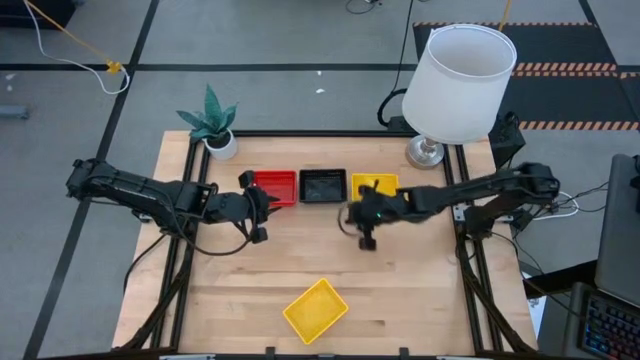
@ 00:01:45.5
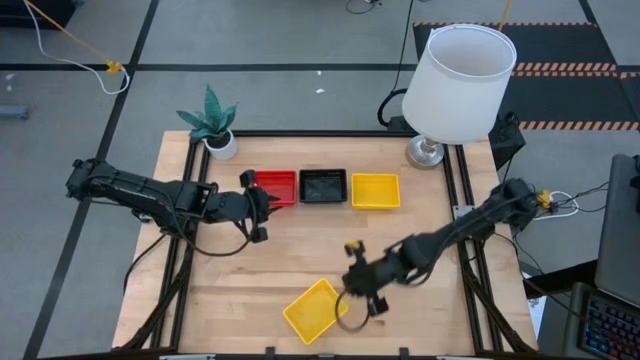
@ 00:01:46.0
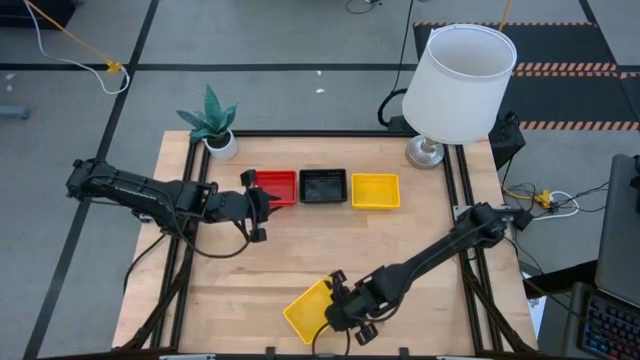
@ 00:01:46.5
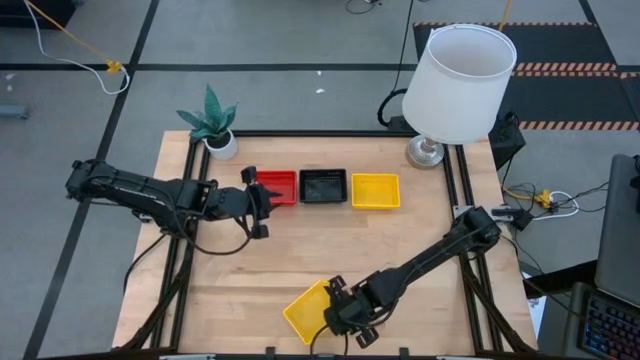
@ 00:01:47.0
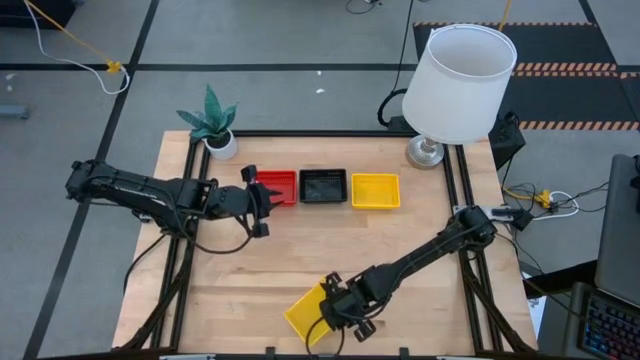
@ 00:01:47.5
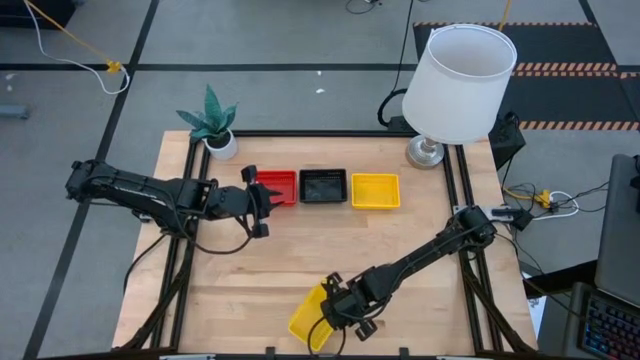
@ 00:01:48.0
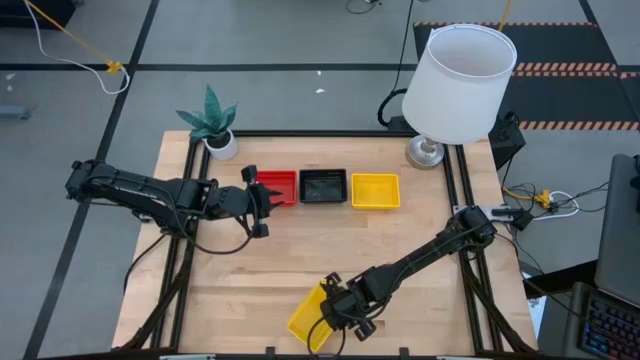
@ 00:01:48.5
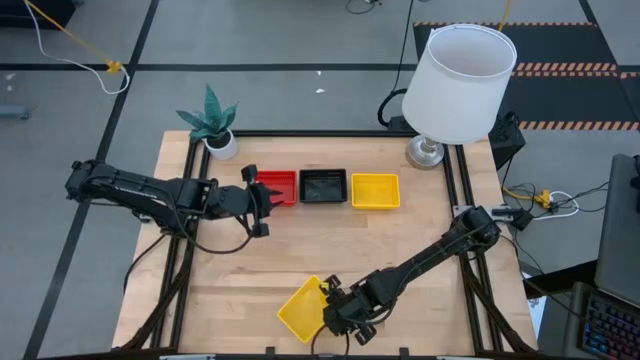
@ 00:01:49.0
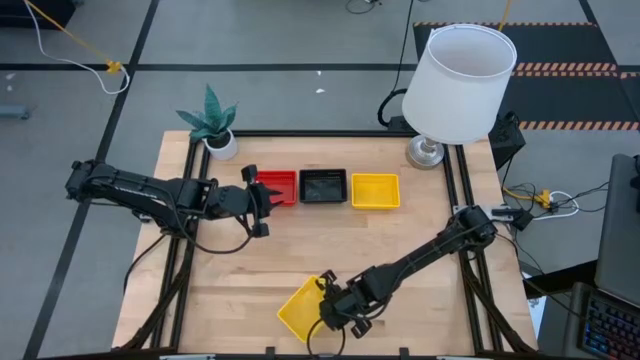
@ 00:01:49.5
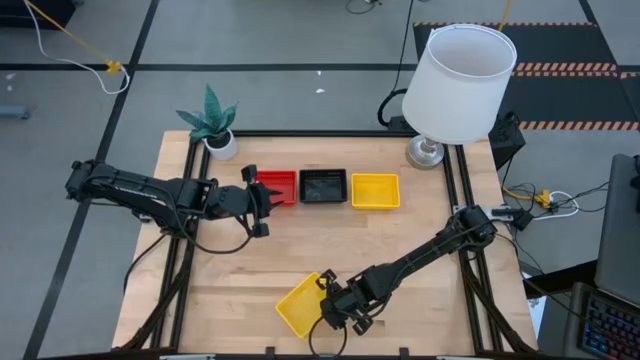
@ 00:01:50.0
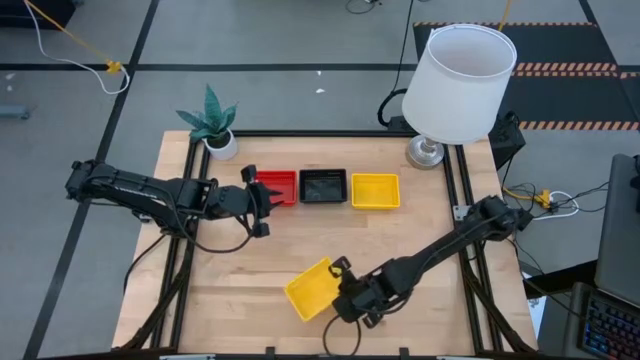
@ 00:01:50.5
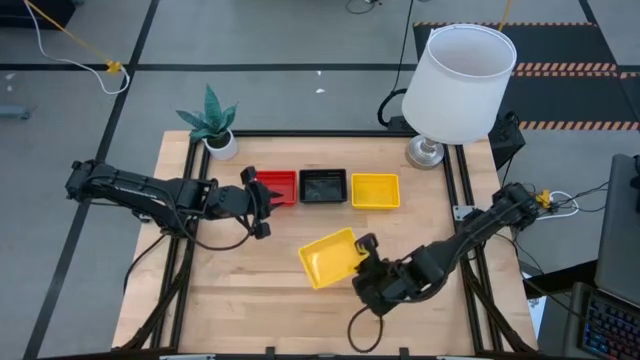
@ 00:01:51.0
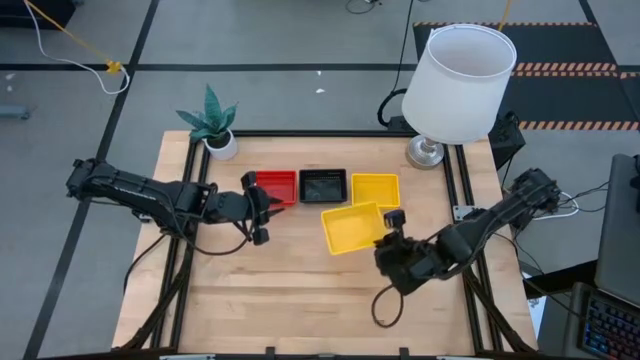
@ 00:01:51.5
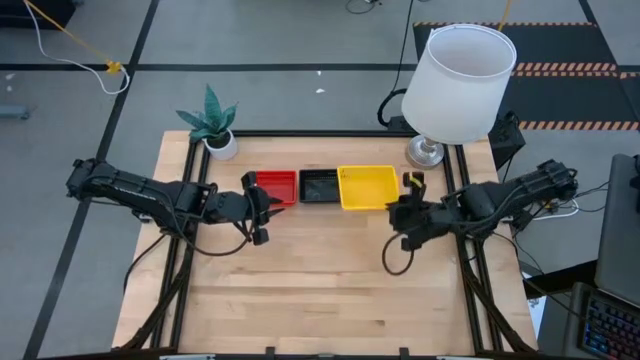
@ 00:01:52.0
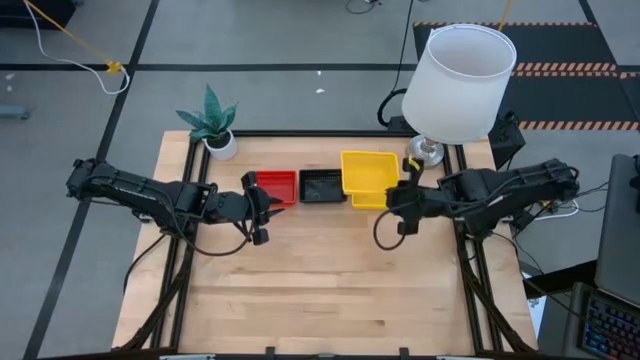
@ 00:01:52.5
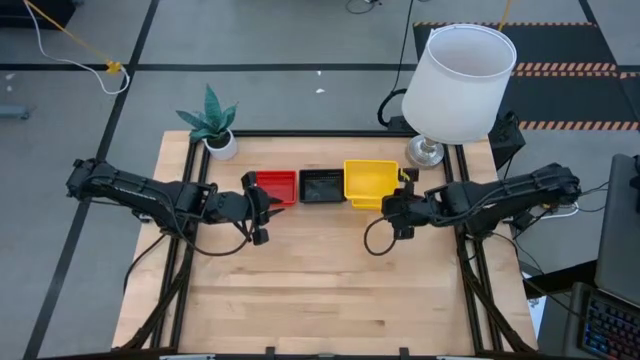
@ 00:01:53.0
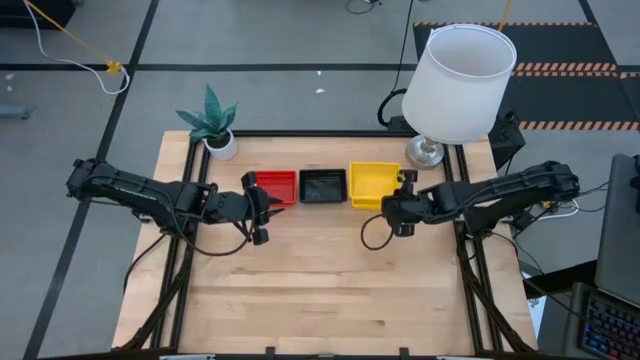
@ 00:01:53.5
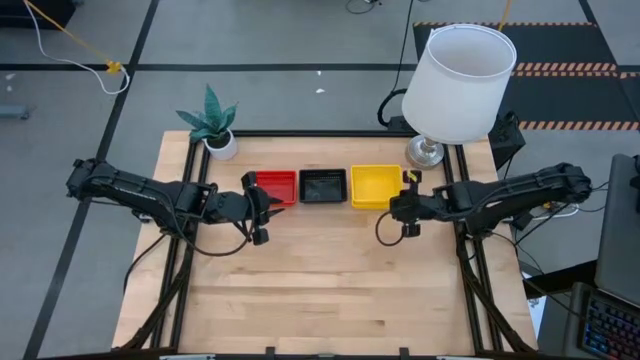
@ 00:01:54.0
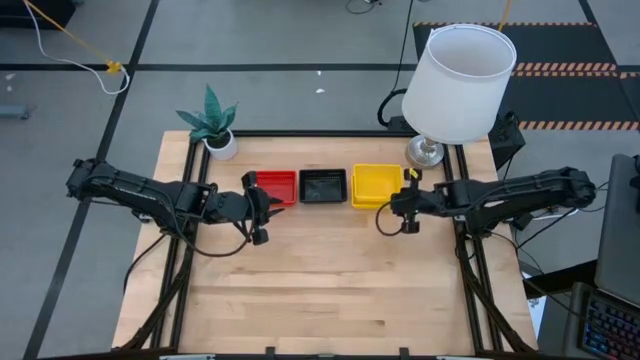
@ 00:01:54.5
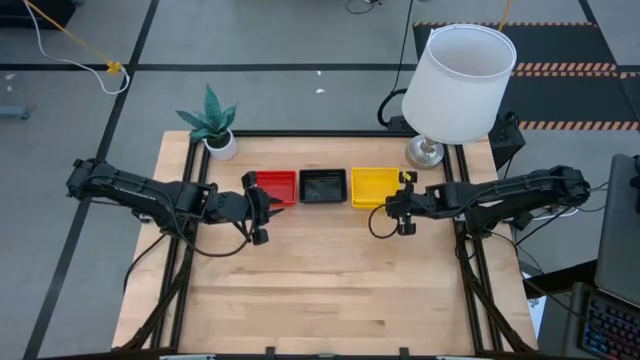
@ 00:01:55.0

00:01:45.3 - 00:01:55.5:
Stack the bottom yellow bin on top of the top yellow bin
